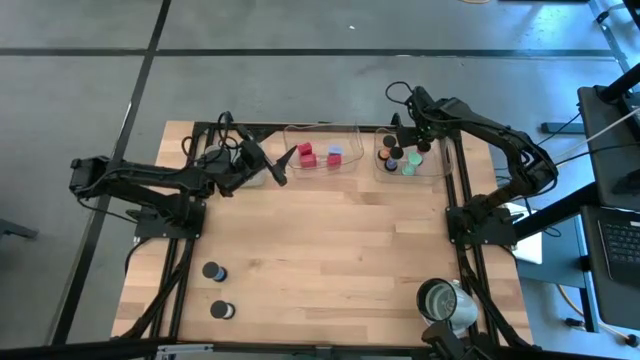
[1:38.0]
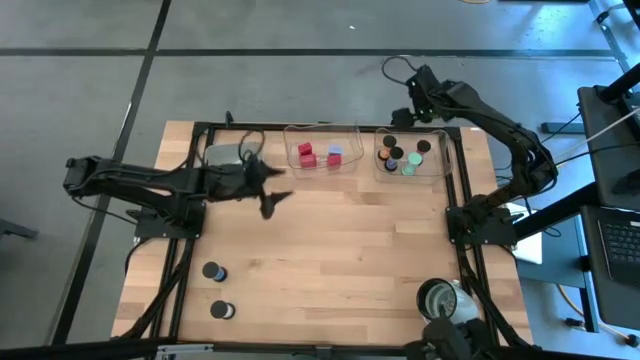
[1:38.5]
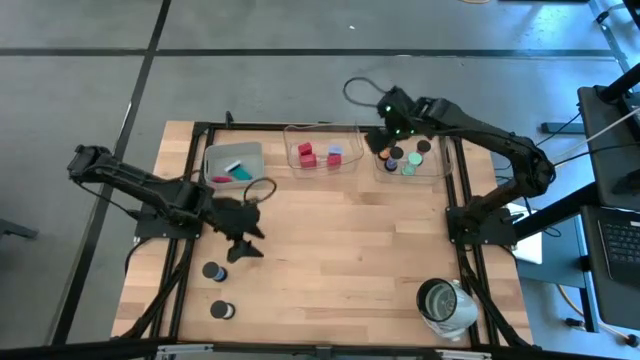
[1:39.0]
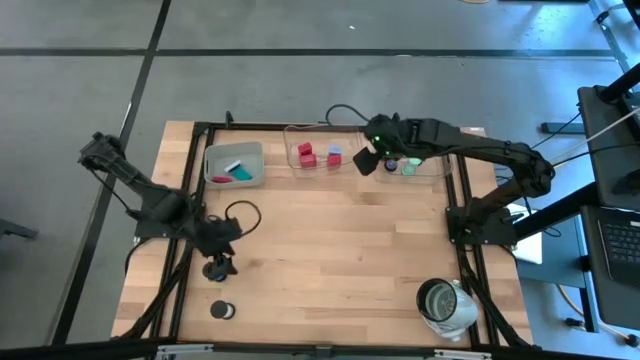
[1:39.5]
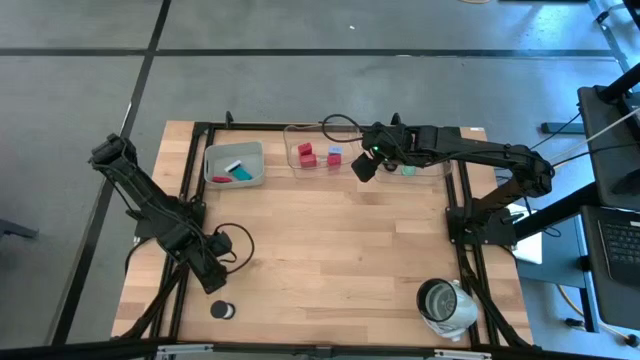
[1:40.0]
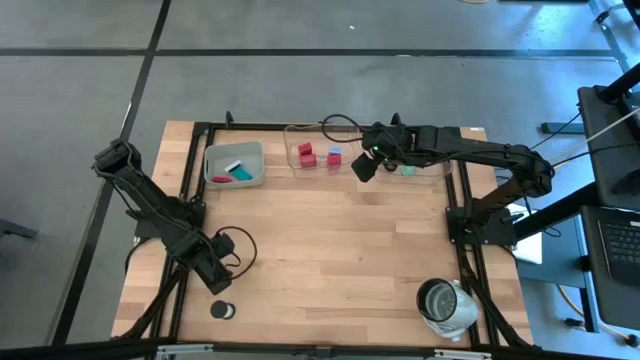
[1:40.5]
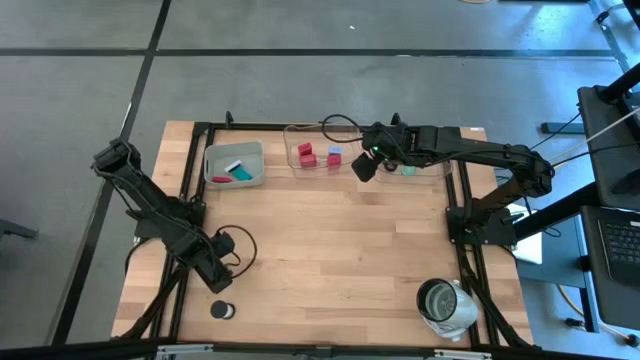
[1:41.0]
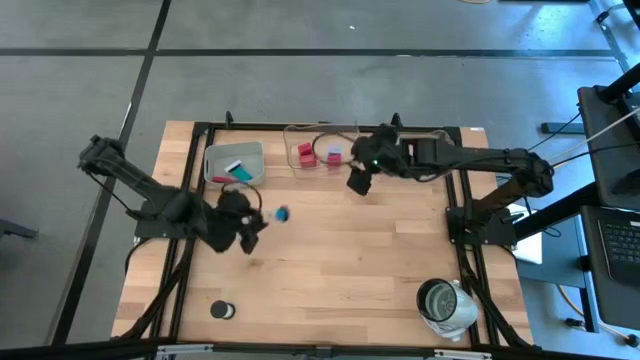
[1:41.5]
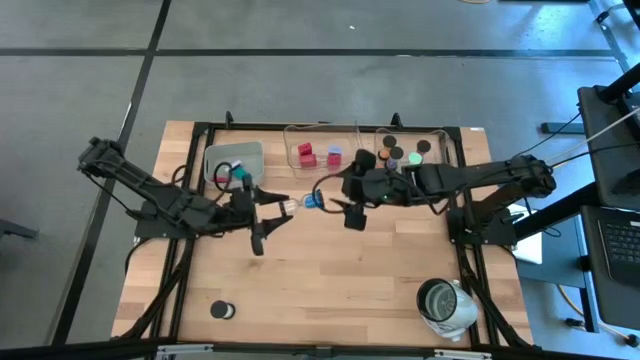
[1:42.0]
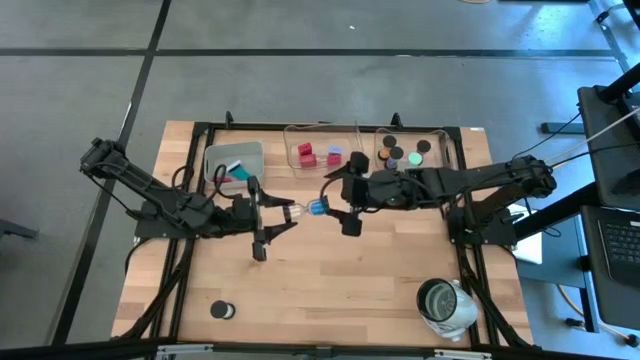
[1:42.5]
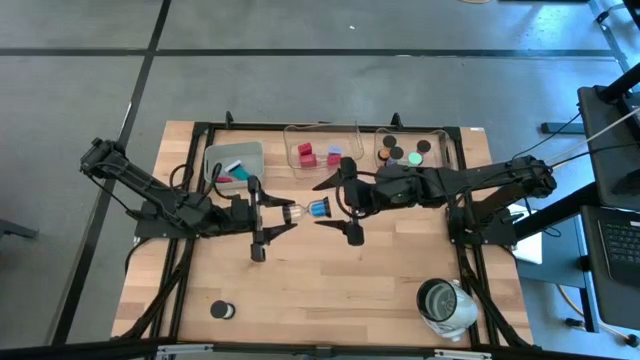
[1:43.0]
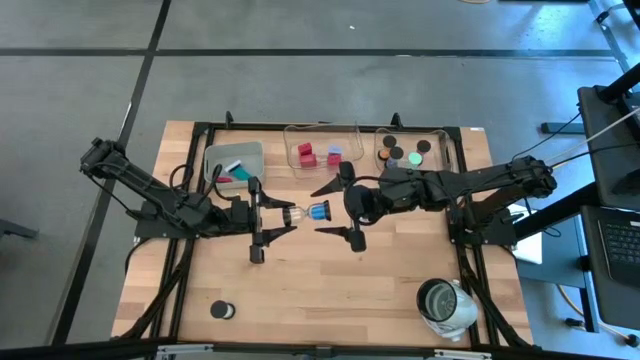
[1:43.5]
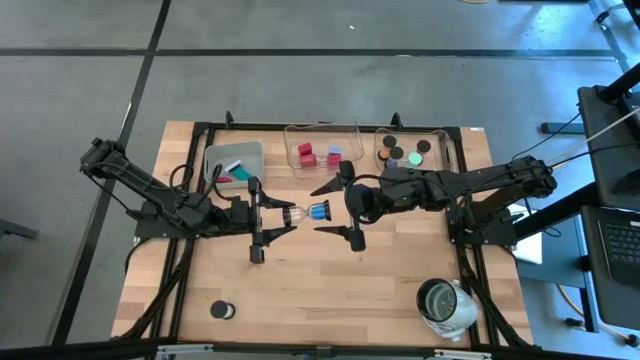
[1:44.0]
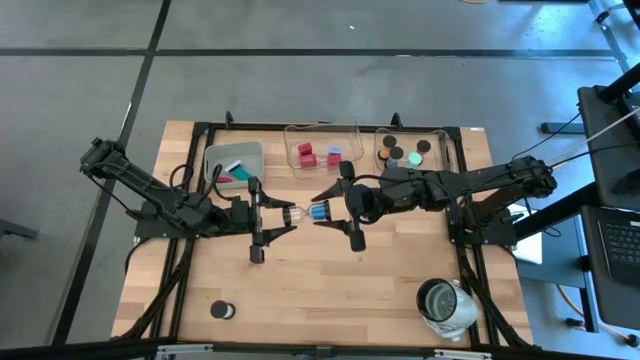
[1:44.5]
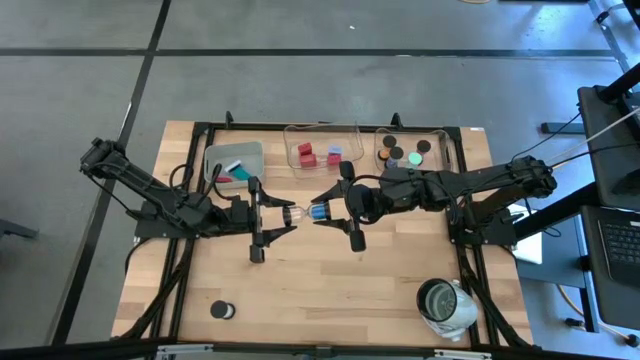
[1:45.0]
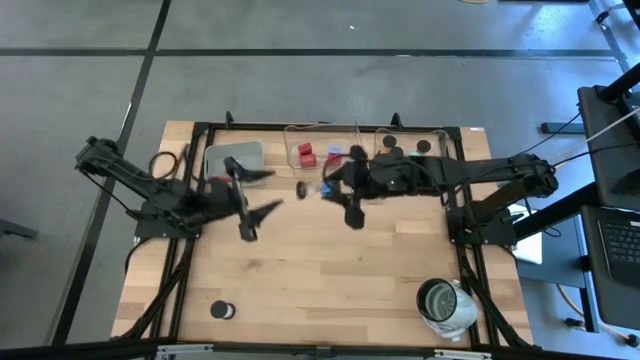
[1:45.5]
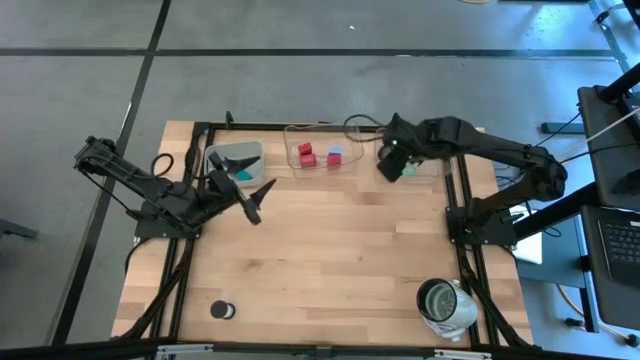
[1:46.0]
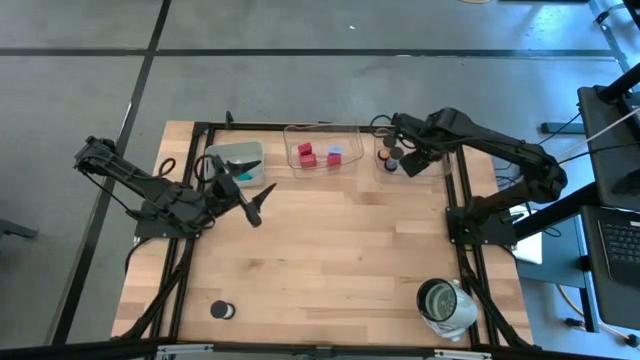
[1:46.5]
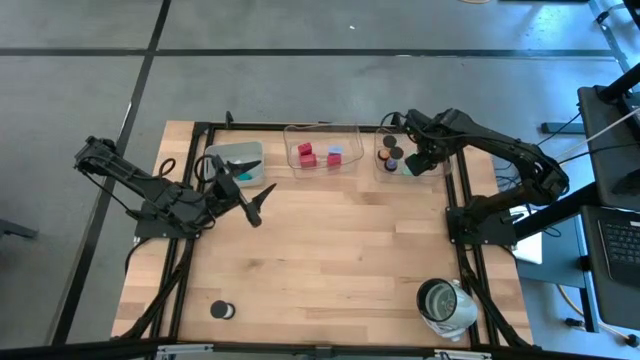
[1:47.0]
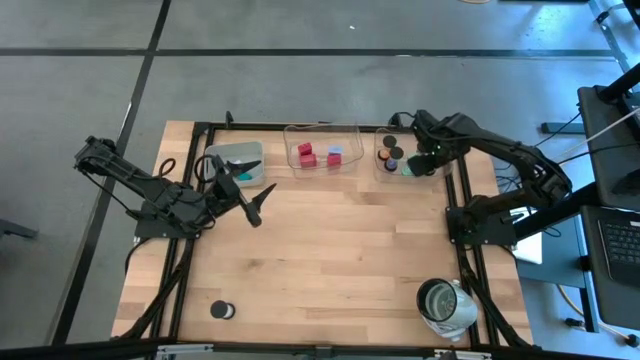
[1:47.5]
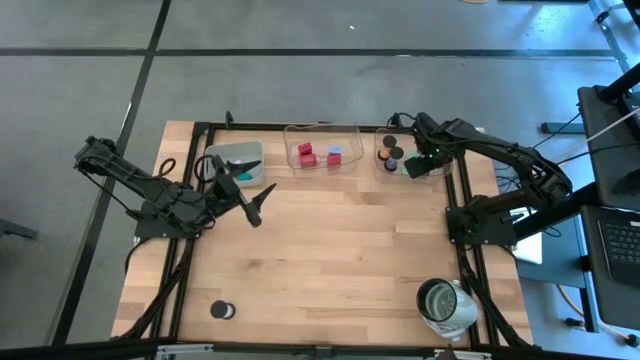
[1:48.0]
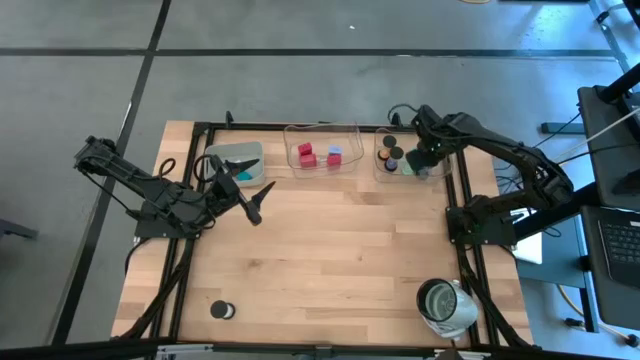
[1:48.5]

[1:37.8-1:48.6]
Task: Pick & Place Office items
Put the blue hourglass into the right transparent bin

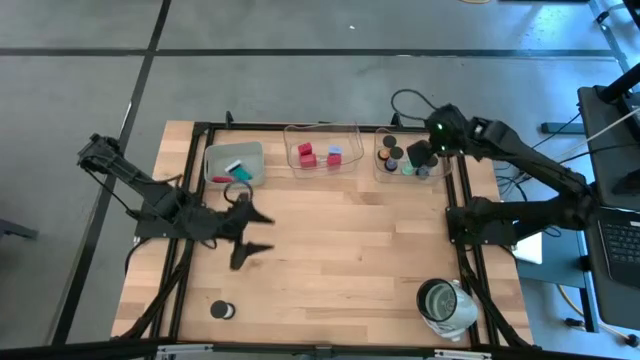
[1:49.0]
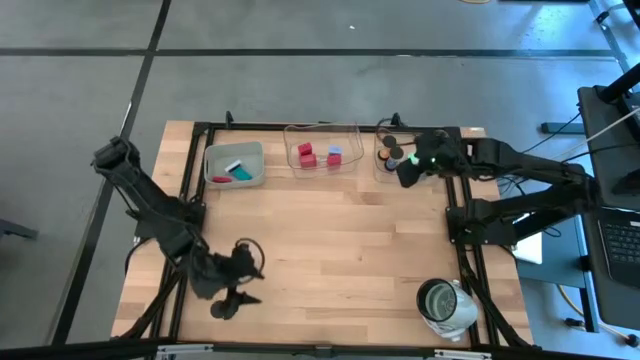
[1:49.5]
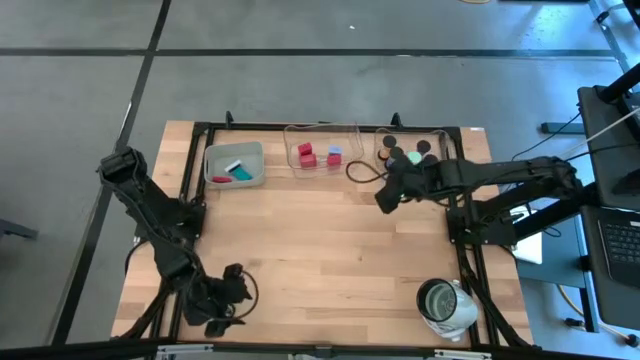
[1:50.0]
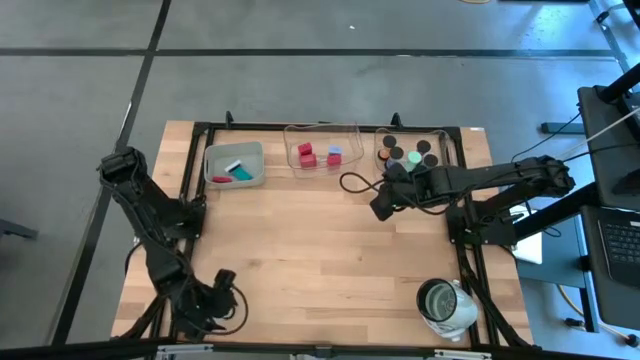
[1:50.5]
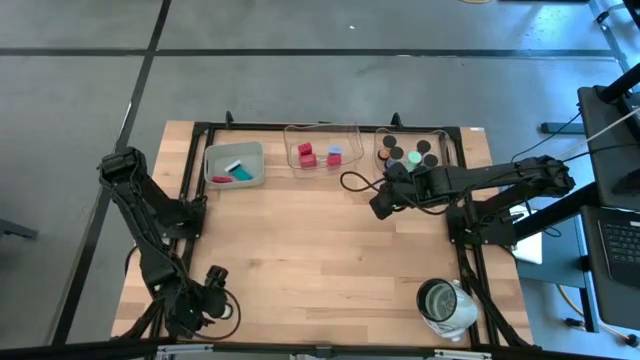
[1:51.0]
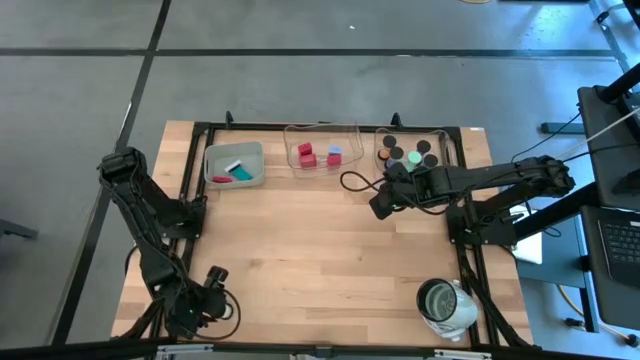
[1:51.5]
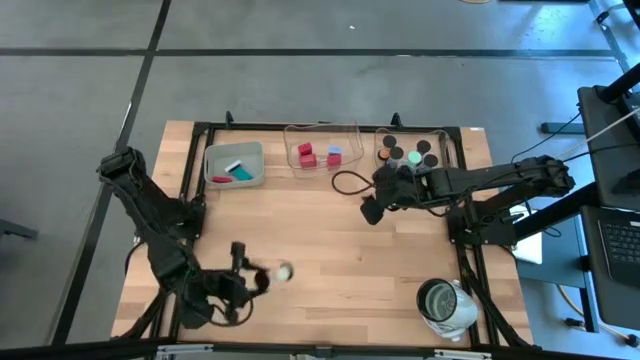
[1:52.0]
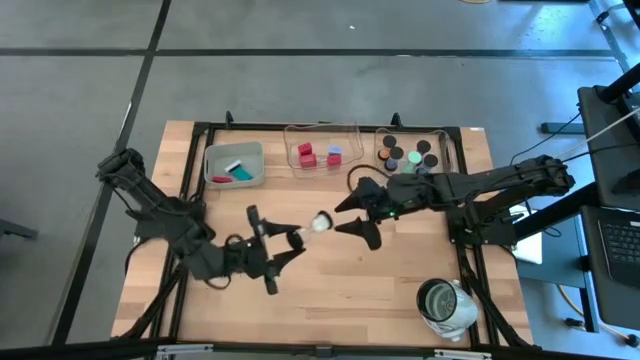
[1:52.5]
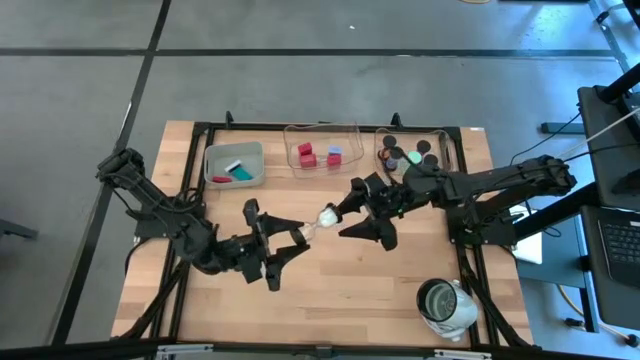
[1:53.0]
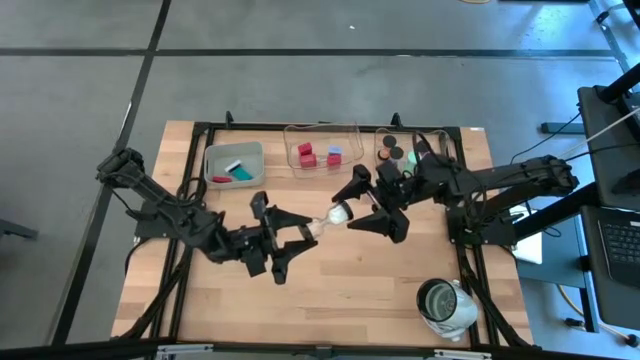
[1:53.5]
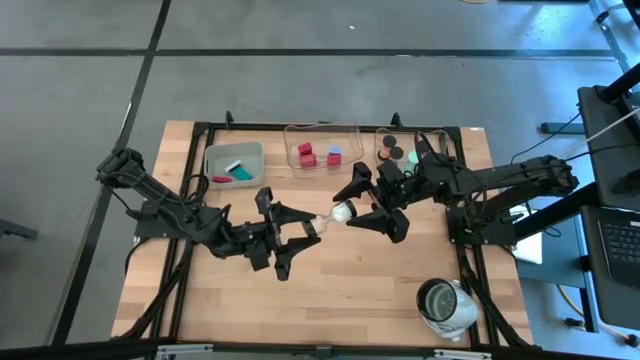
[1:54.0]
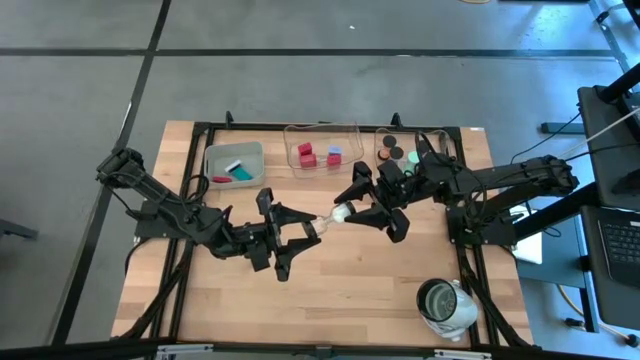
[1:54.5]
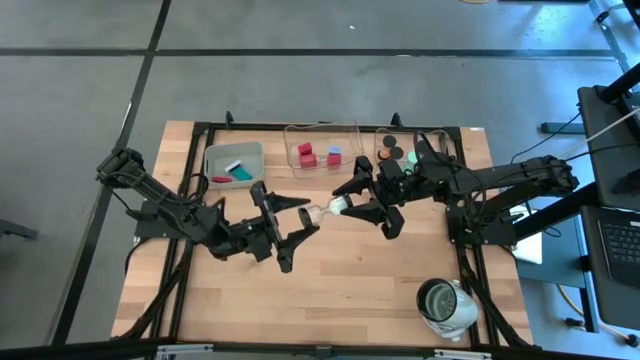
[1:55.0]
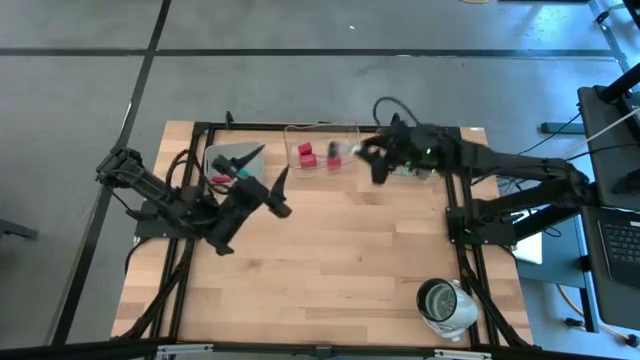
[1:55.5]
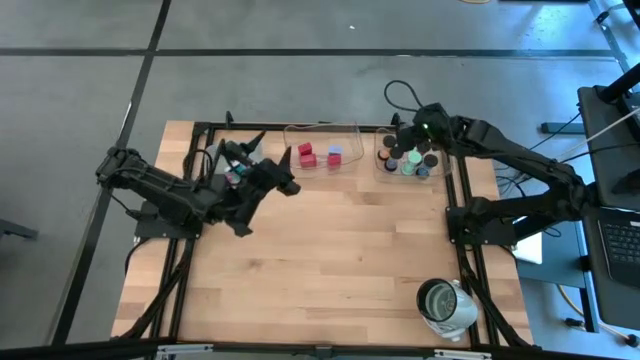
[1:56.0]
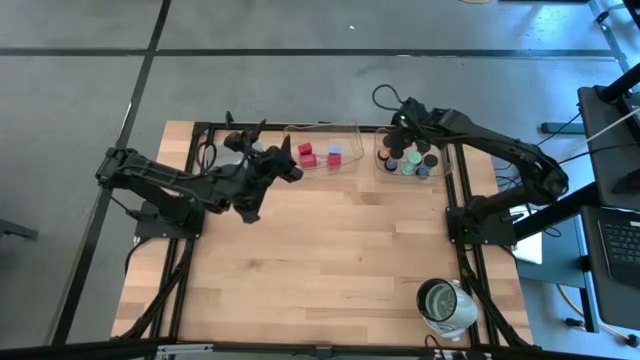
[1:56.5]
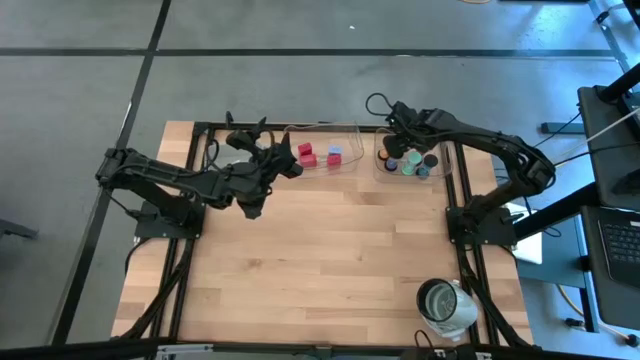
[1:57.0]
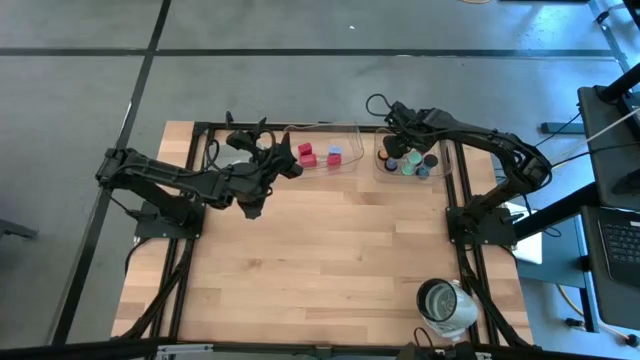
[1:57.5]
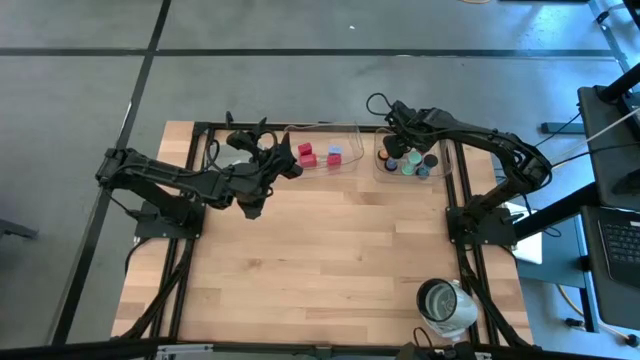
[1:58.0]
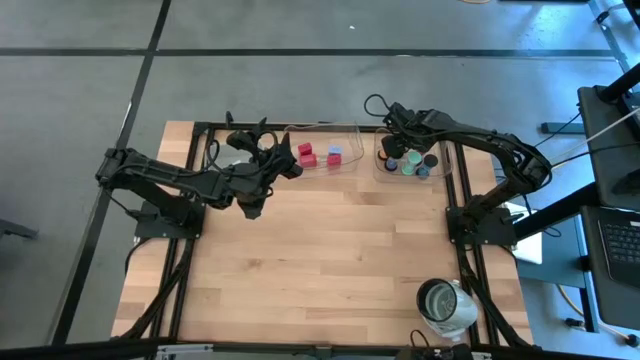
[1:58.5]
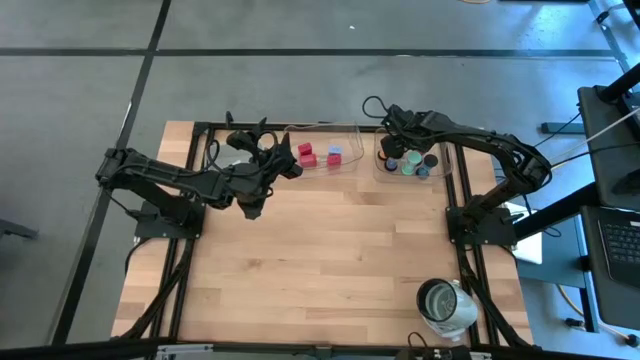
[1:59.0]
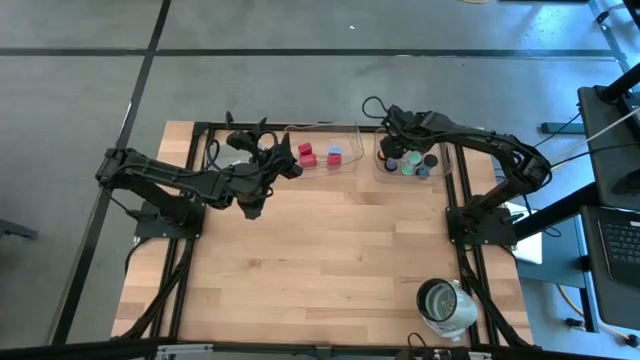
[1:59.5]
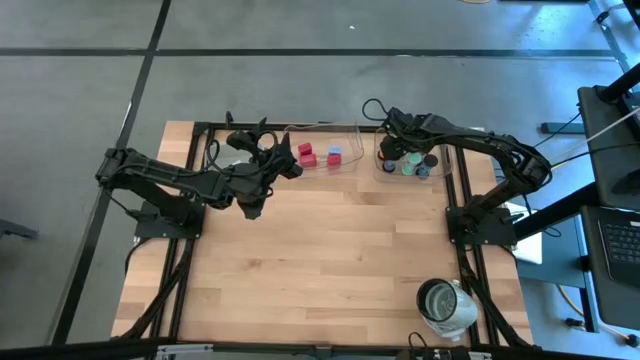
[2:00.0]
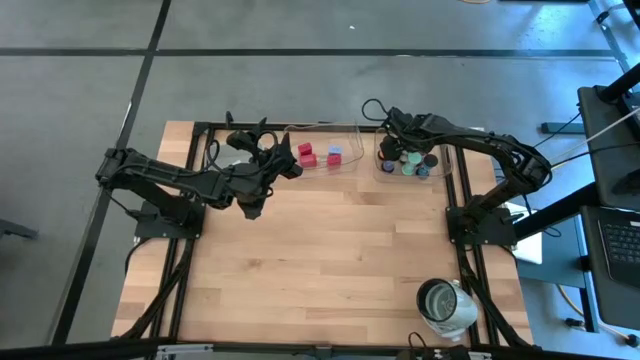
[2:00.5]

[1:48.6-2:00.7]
Put the white hourglass into the right transparent bin
